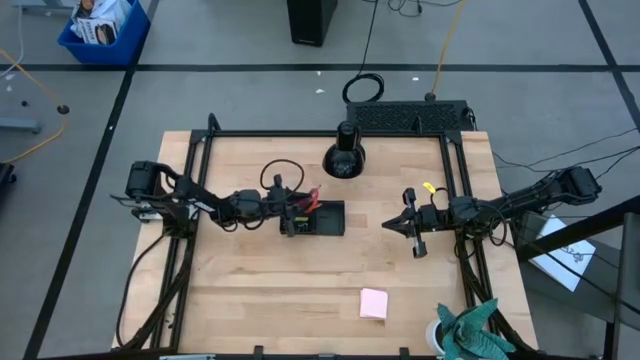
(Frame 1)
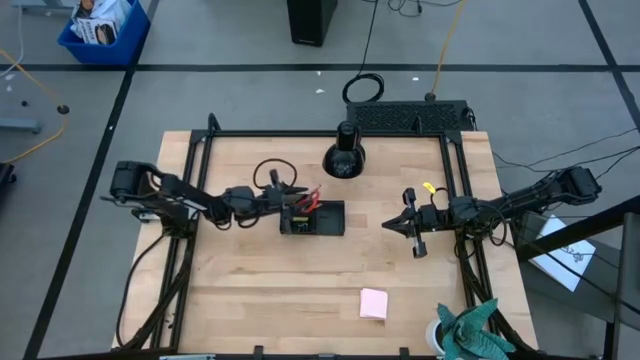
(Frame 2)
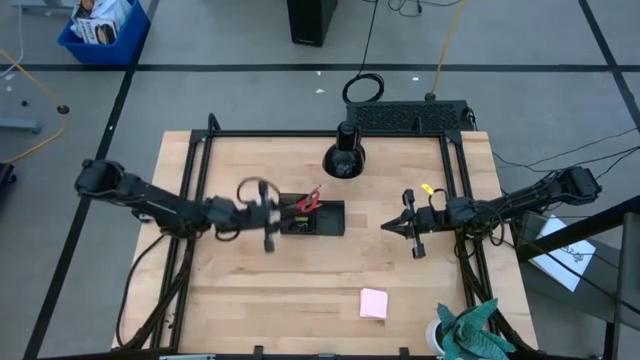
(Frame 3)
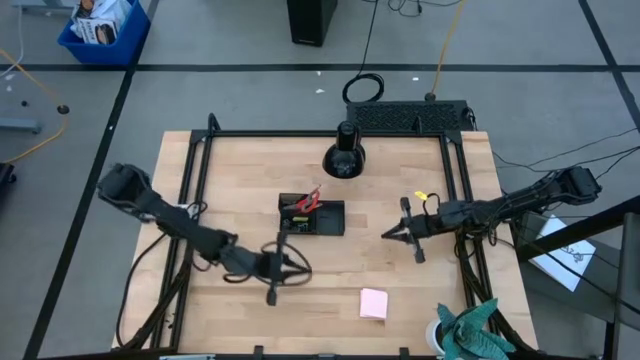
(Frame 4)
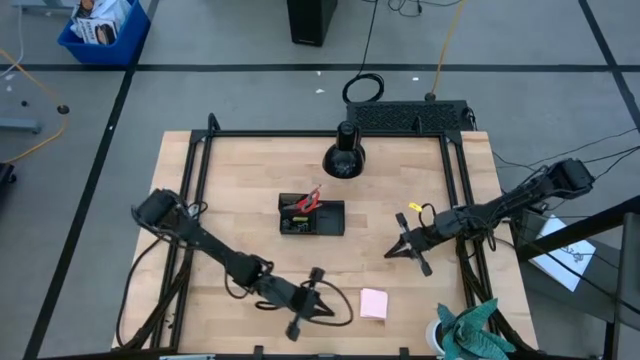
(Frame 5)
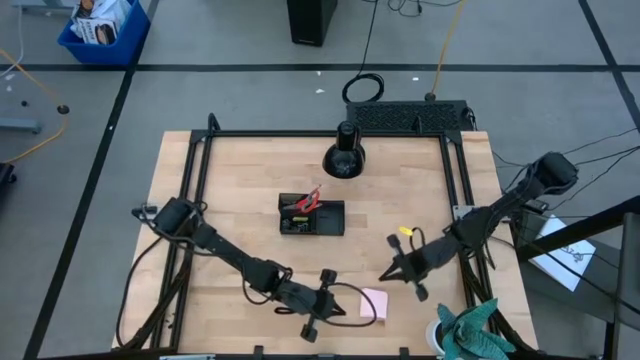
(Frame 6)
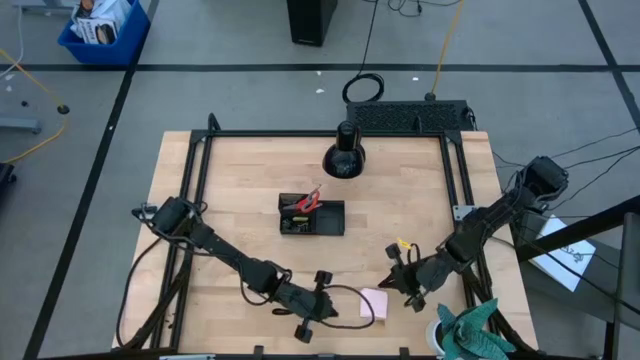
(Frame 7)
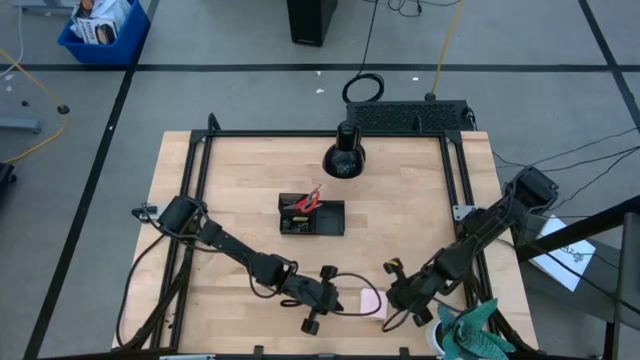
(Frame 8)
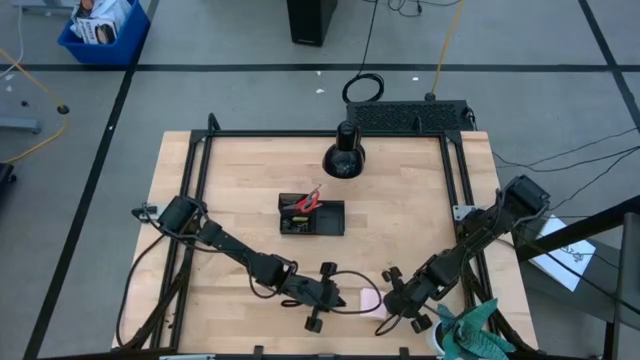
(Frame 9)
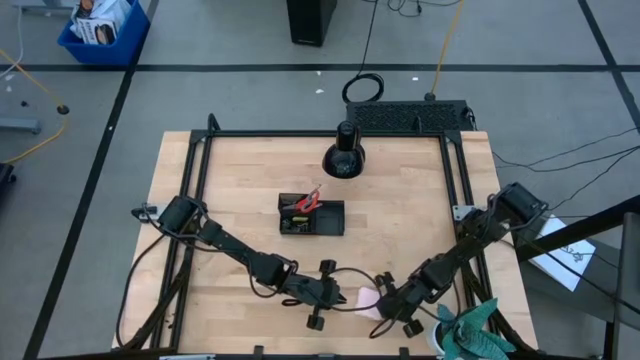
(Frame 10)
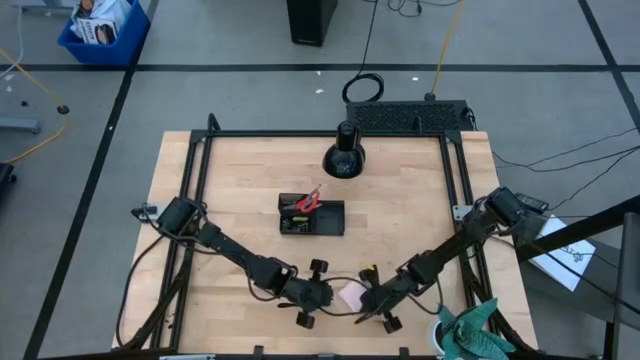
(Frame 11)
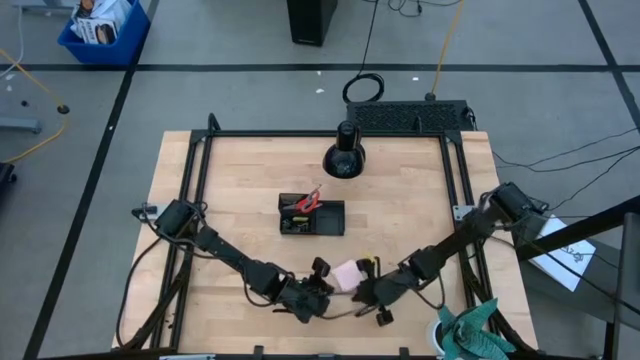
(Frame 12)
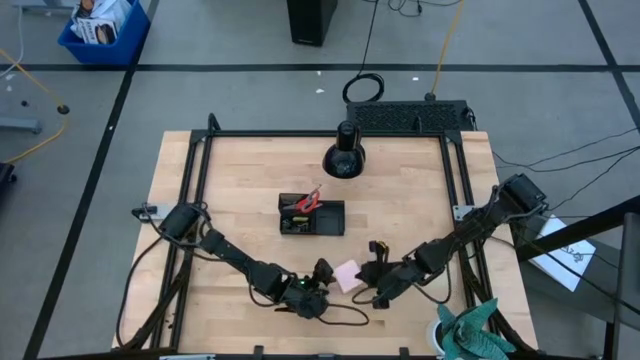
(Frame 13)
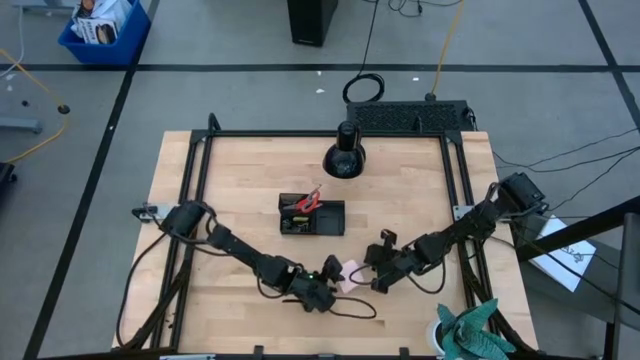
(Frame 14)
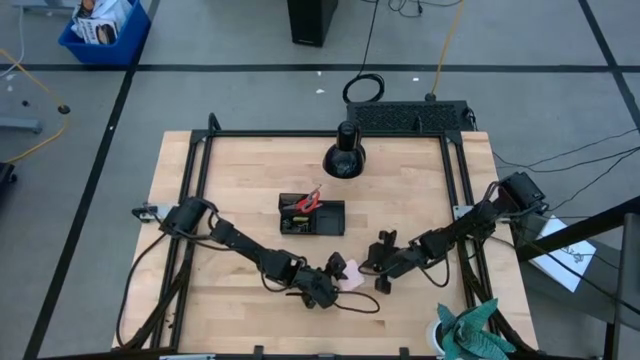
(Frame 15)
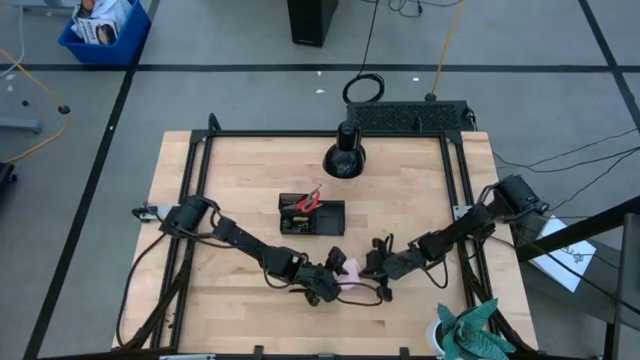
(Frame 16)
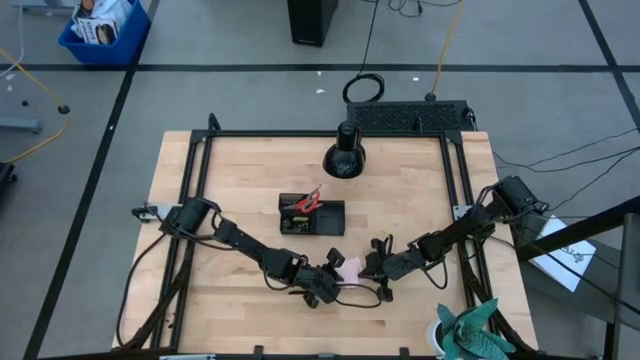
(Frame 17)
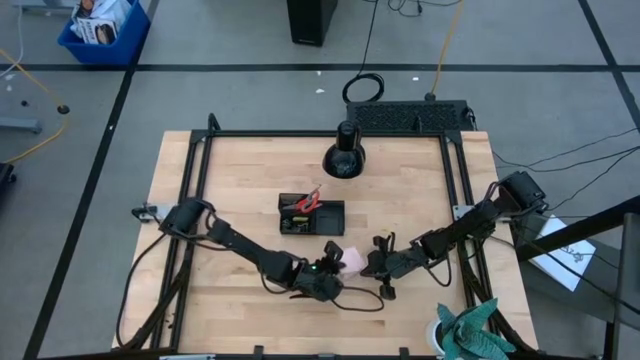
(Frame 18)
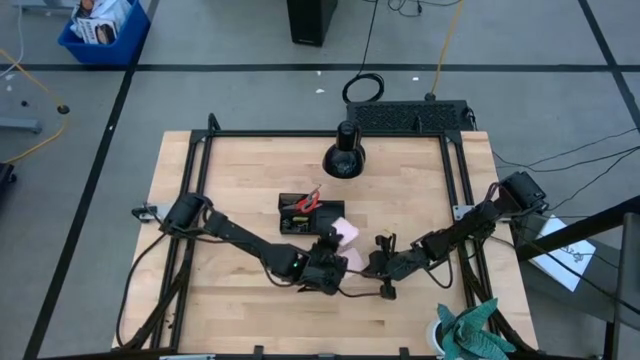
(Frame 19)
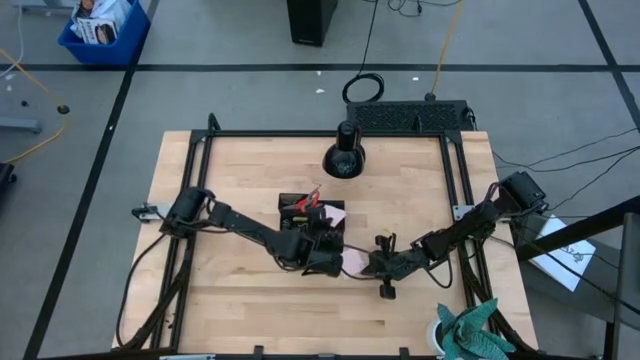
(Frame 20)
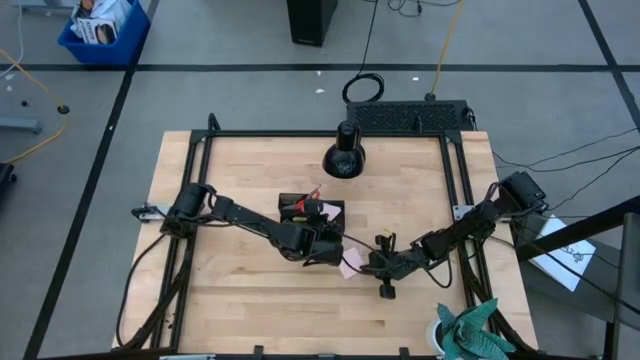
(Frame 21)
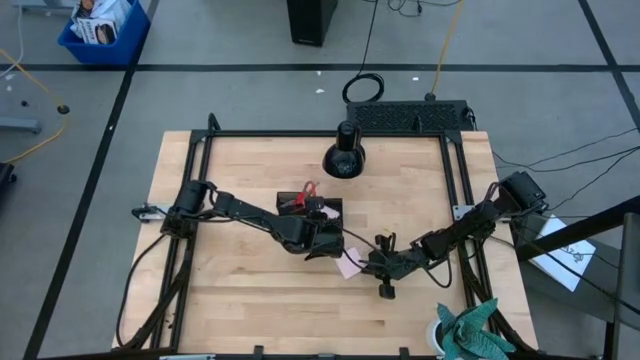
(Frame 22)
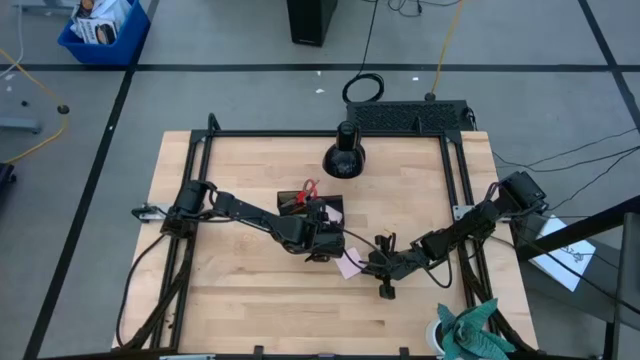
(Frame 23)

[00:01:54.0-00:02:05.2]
Task: Pick and place office supplies into organizer
Put the top sticky note into the desk organizer

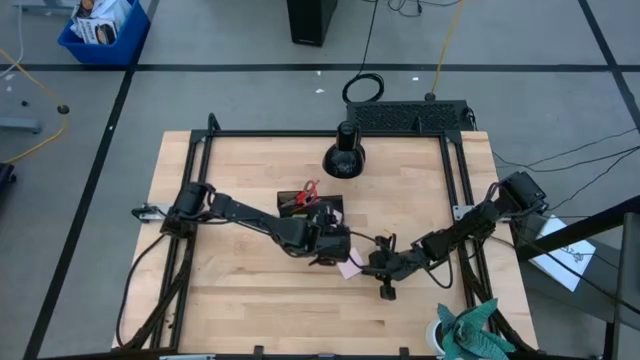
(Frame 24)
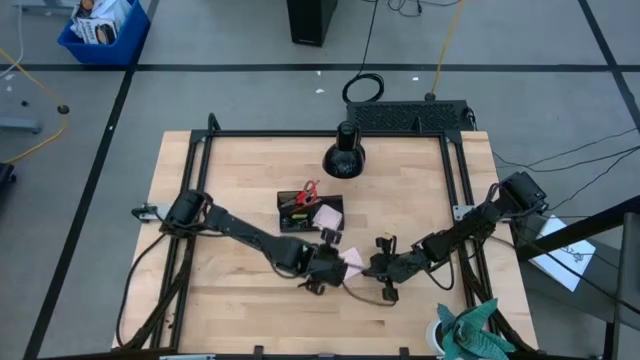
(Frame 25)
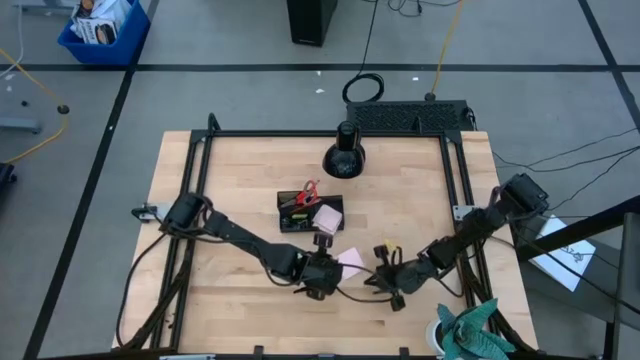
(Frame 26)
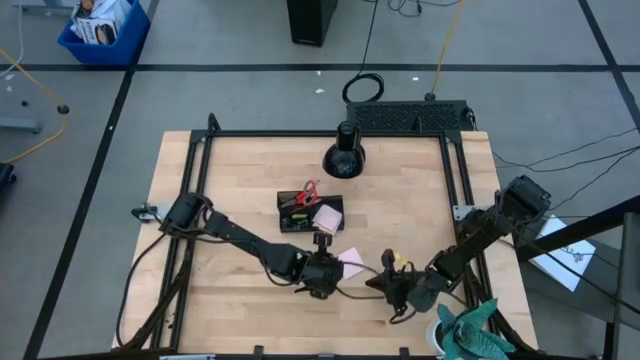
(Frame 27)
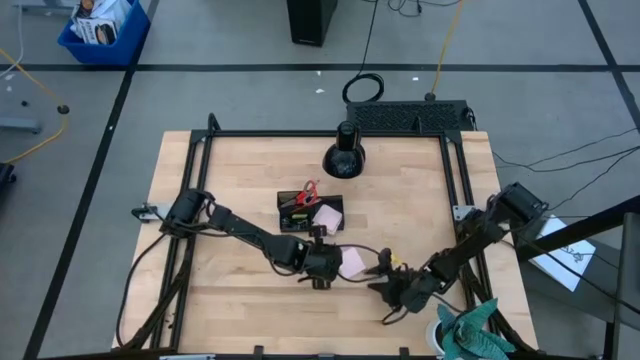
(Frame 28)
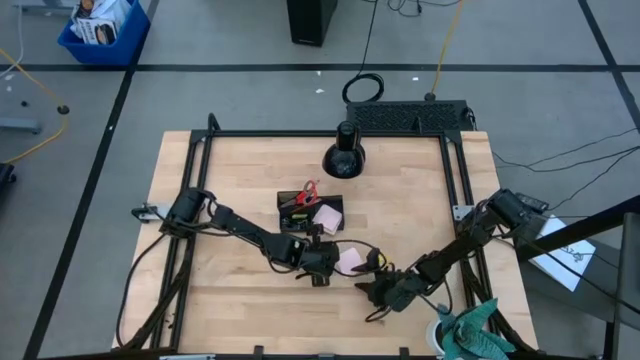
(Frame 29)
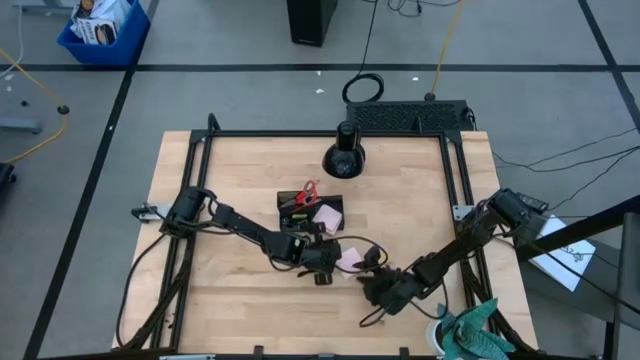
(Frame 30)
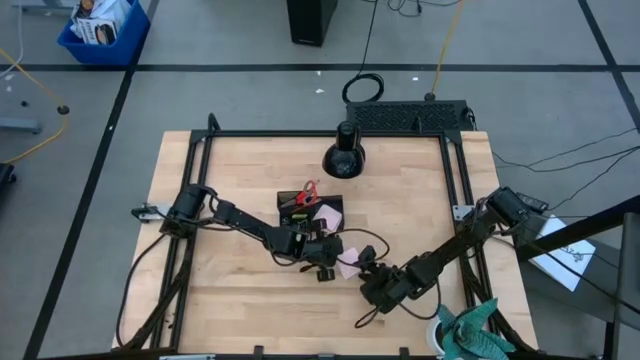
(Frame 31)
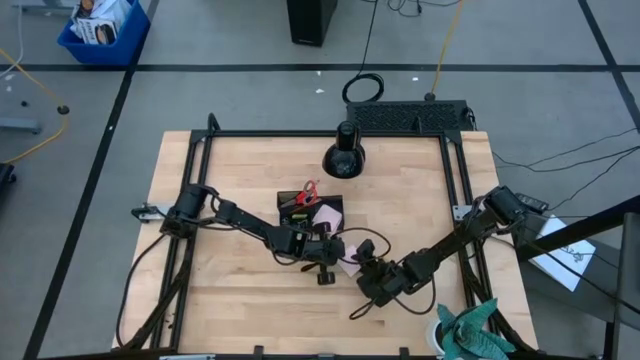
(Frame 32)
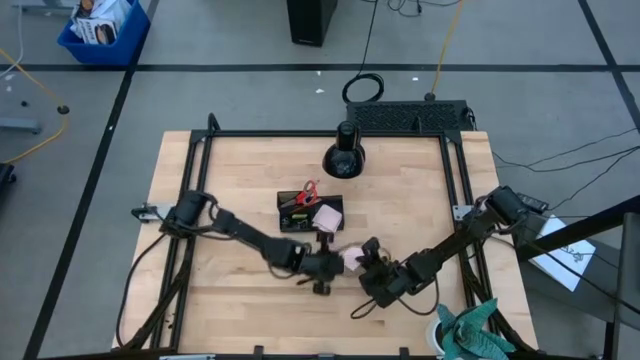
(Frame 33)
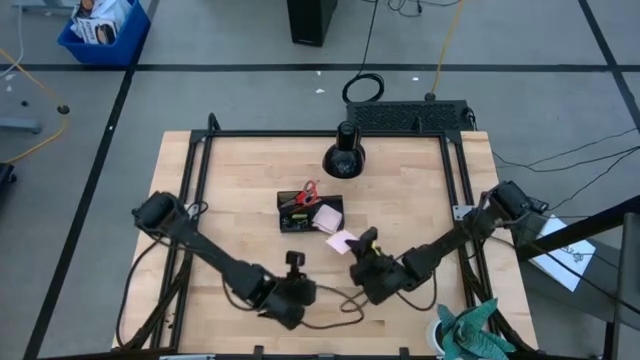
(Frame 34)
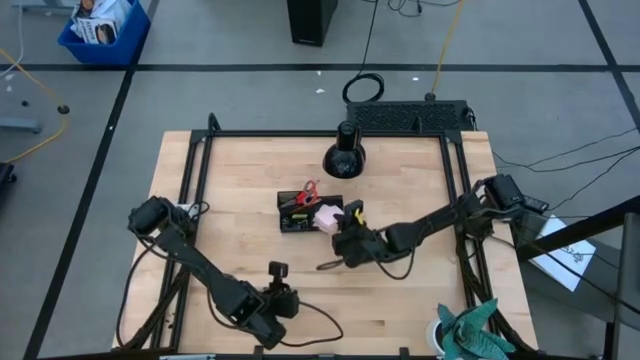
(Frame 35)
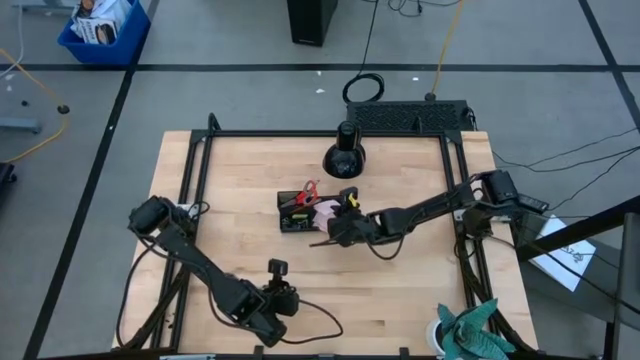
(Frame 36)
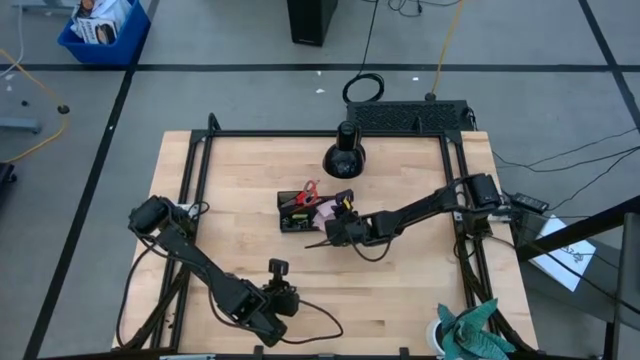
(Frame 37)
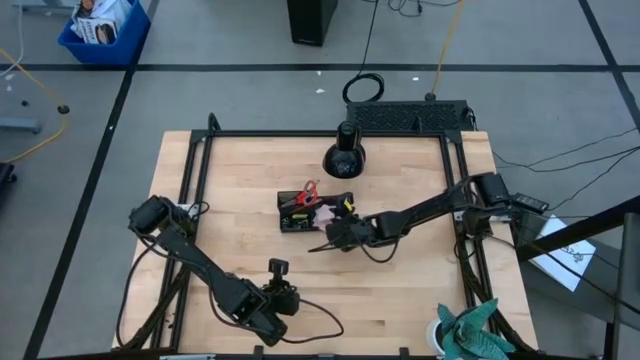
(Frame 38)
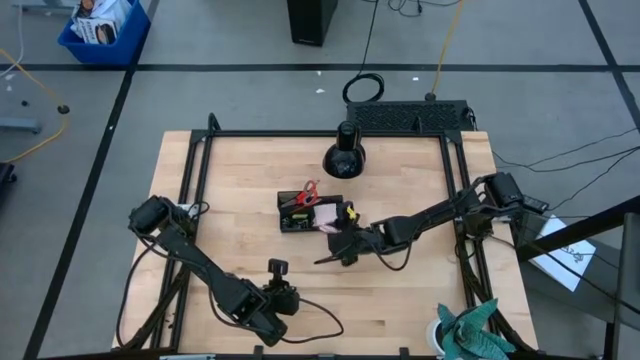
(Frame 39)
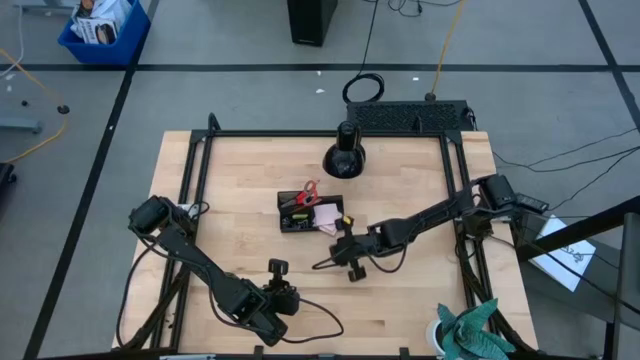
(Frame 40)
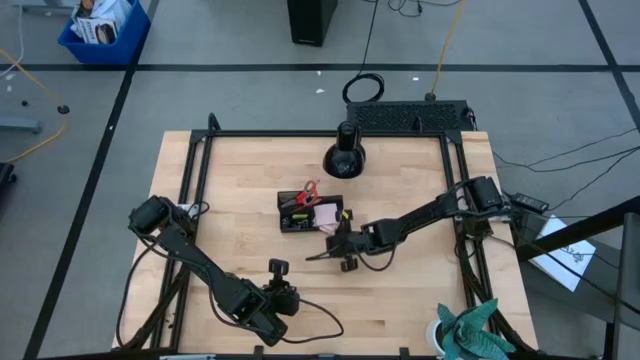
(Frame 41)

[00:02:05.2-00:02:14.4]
Put the sticky note into the desk organizer
